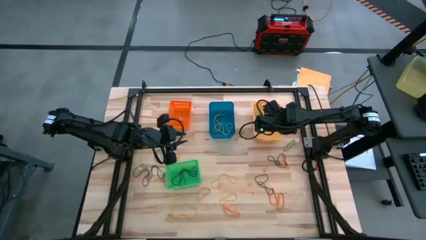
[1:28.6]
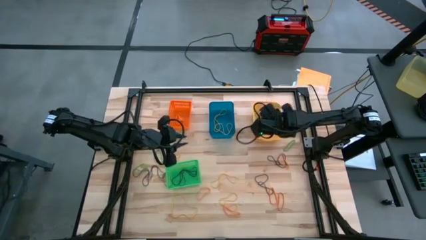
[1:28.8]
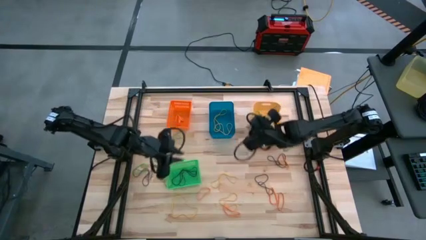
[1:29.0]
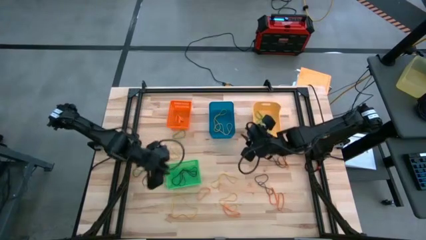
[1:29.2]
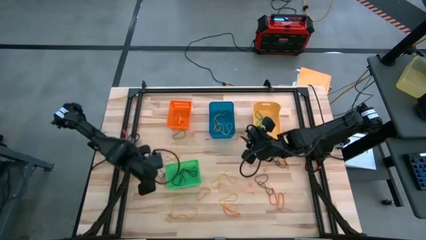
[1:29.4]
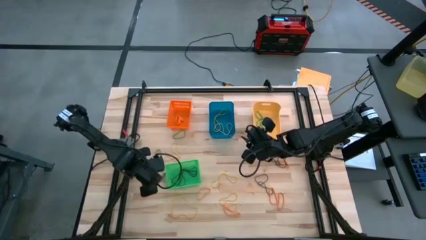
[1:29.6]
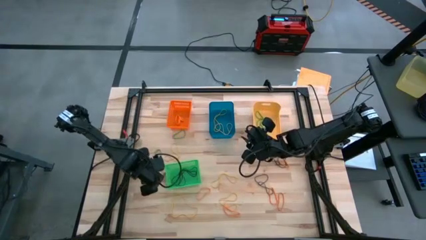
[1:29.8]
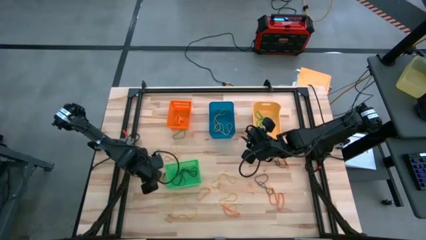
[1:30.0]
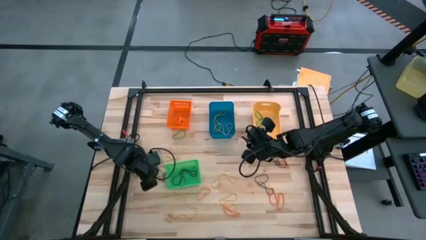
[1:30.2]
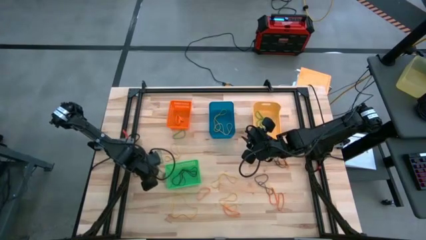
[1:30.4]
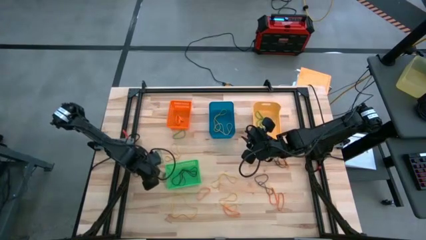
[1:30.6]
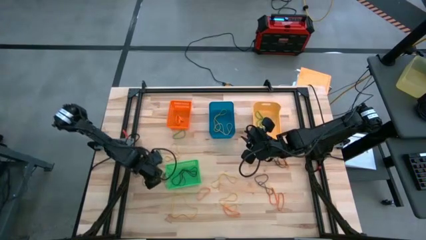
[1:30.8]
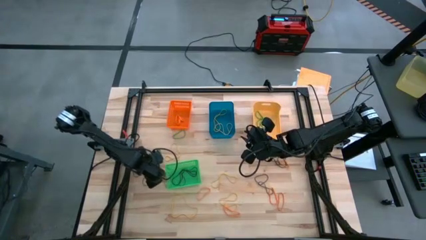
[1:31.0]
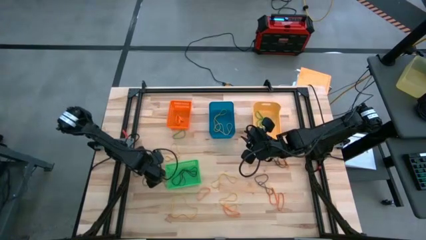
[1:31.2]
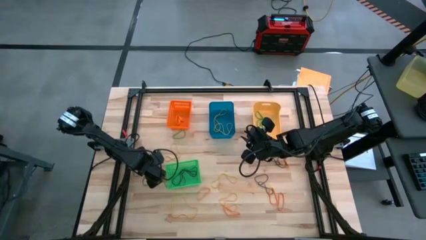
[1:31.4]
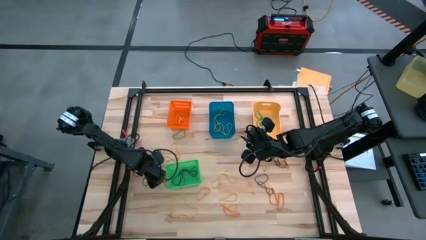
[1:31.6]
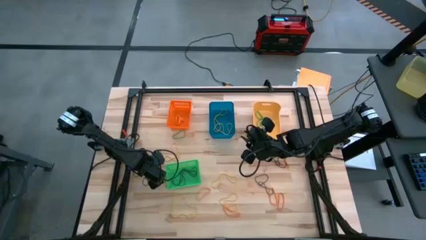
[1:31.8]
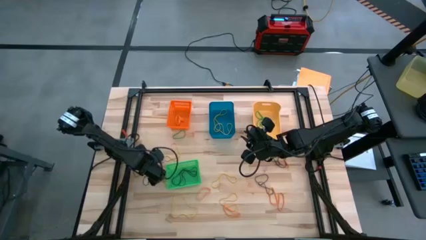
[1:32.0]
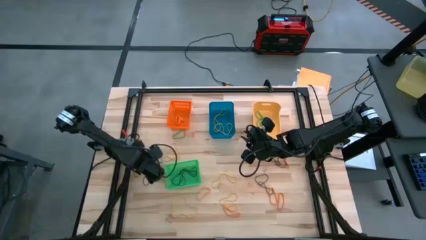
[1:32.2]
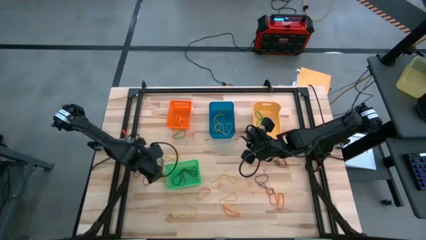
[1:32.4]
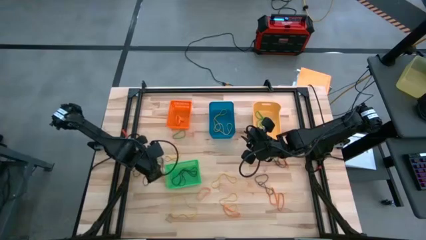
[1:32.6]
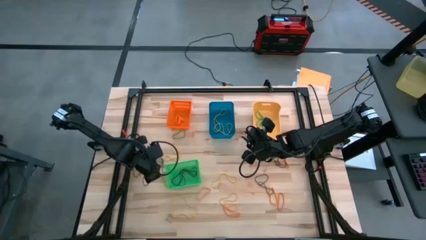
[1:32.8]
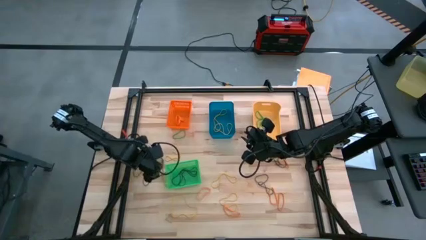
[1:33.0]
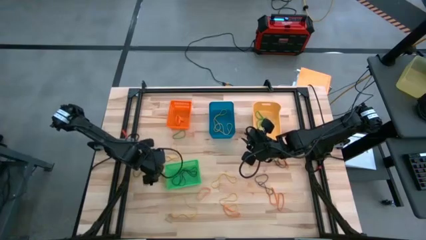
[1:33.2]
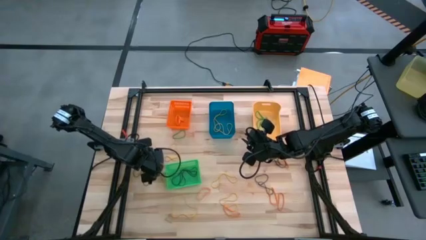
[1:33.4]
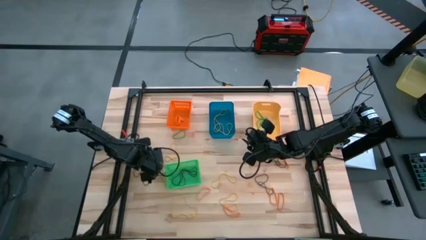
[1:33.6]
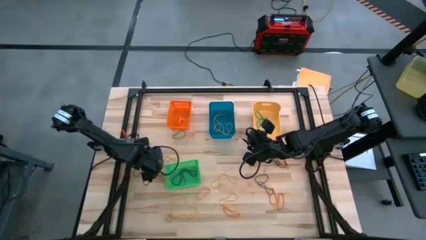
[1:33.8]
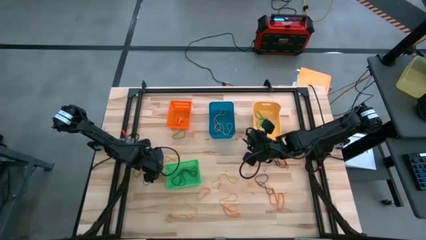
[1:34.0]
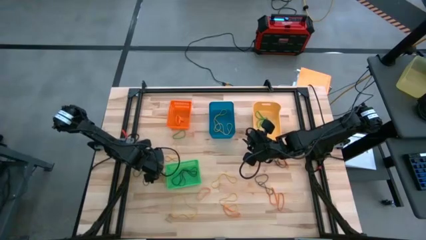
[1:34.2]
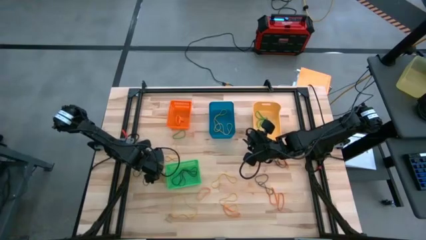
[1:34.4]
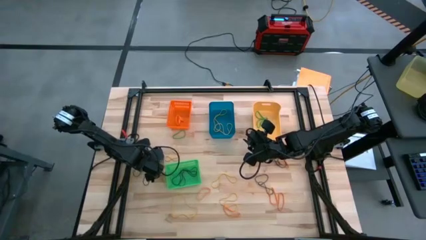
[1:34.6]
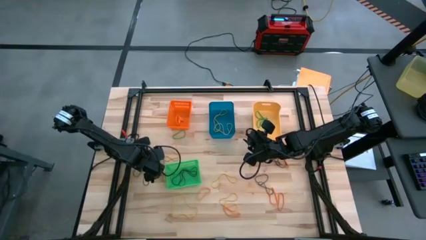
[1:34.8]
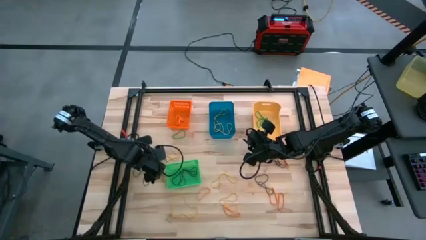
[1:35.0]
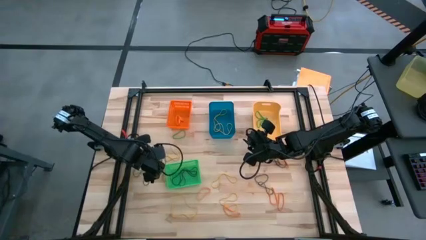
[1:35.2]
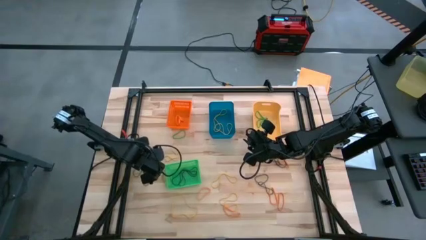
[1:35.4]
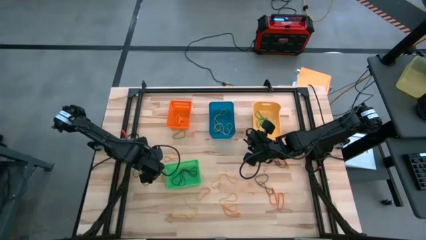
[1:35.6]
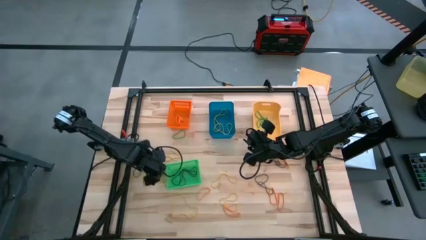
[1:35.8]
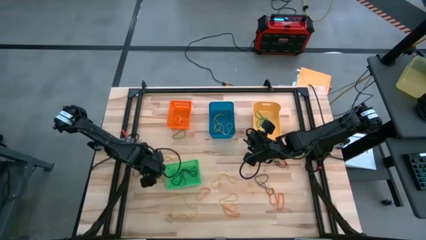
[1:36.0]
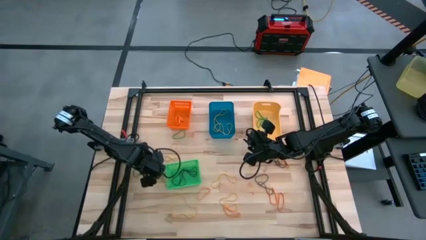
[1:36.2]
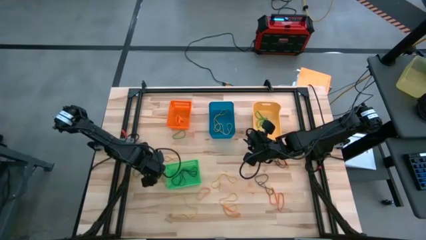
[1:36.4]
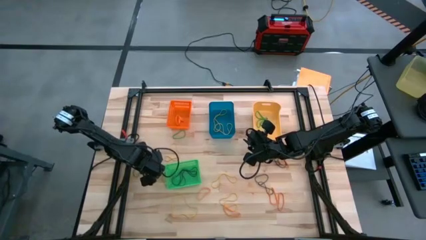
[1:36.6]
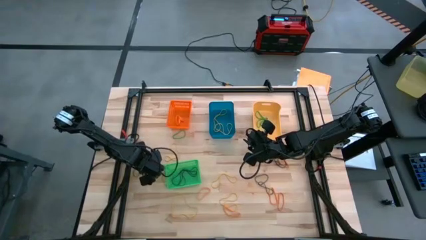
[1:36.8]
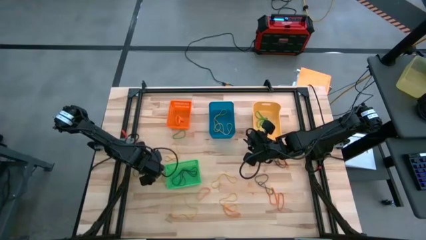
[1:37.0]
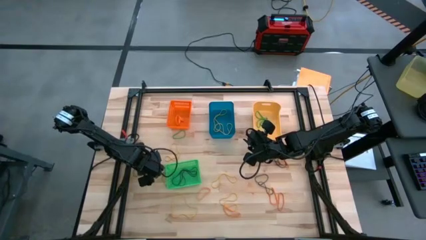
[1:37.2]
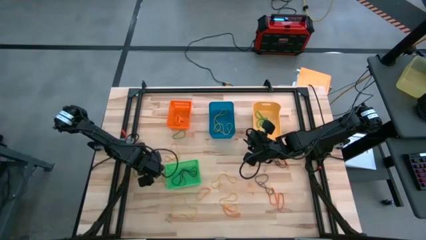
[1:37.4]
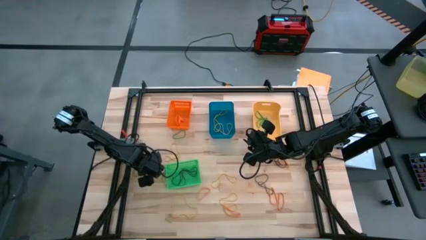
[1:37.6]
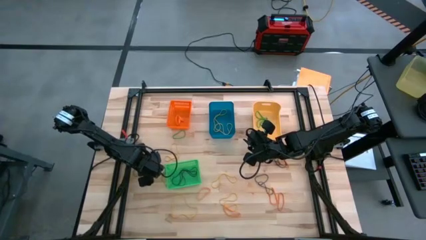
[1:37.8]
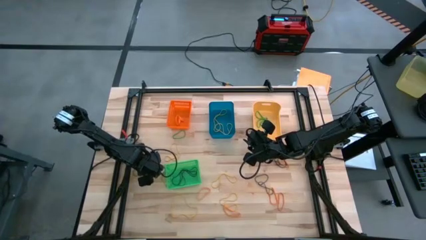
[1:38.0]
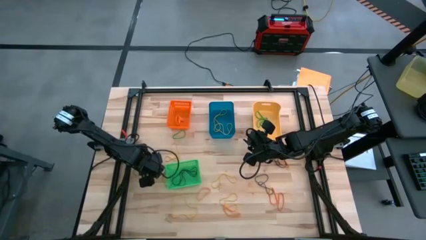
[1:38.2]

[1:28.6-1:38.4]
Task: Sort rubber bands into baskets
Put the violet rubberband into the green bin

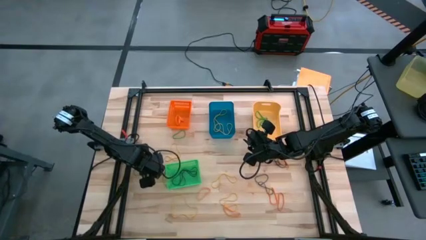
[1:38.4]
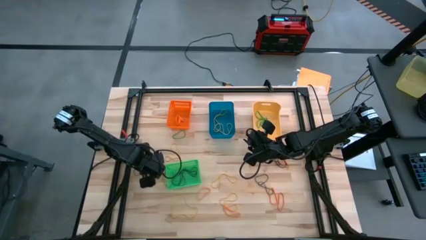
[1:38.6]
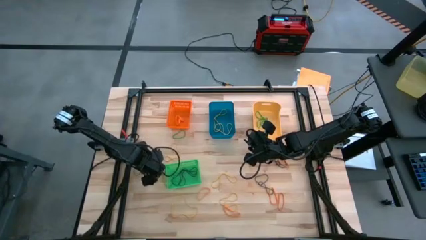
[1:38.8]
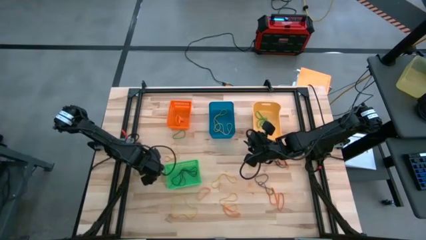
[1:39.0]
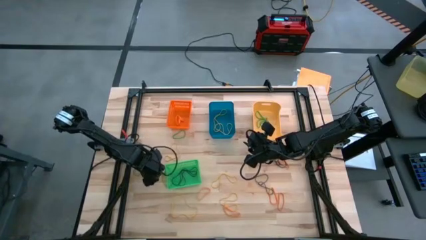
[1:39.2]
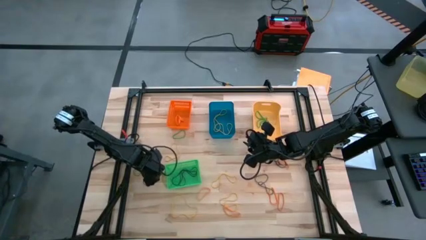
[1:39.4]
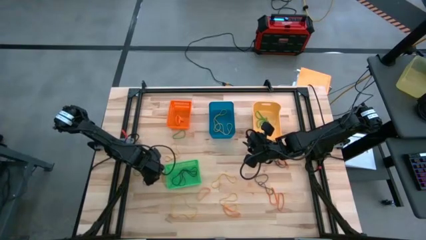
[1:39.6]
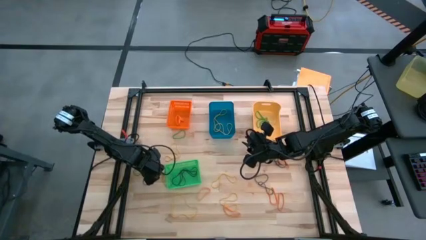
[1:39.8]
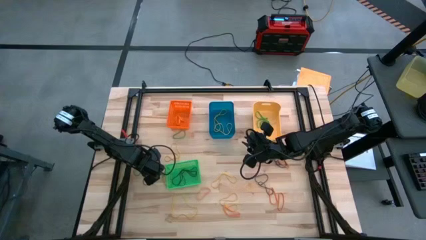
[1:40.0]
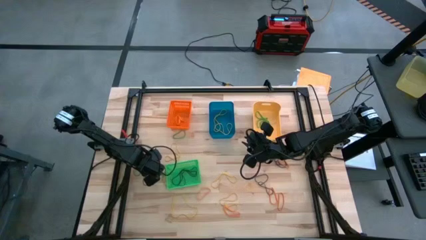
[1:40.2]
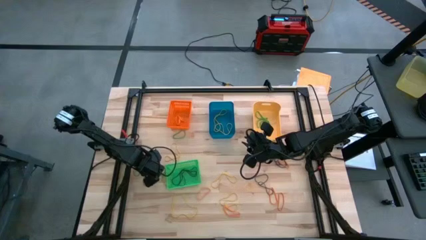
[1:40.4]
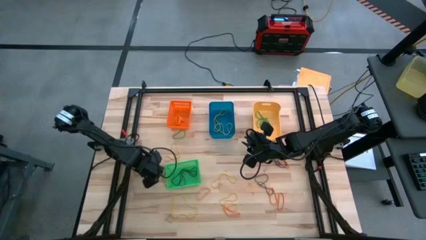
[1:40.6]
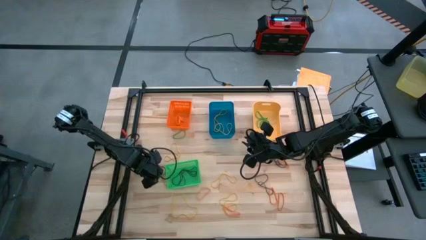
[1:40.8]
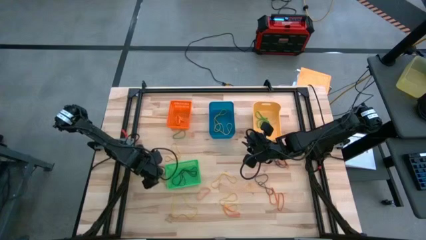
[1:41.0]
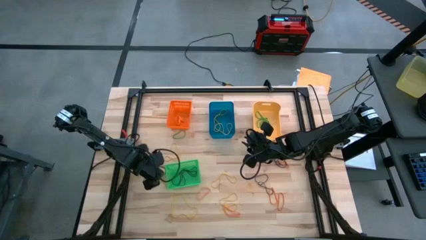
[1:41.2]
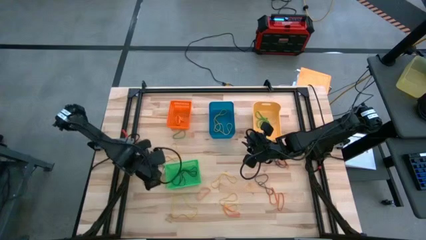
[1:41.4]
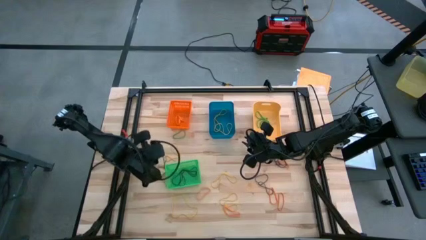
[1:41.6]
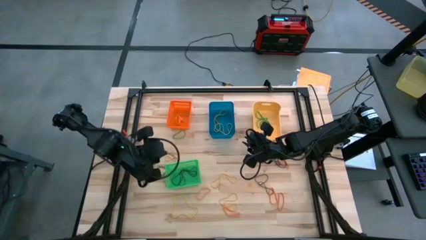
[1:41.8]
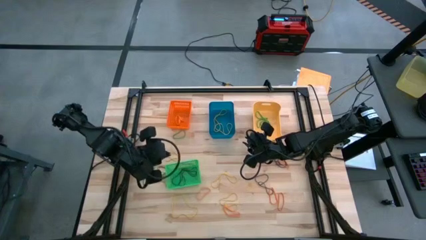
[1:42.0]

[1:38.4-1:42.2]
Put the violet rubberband into the green bin

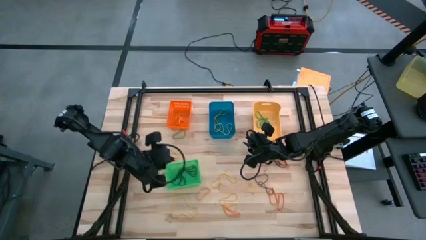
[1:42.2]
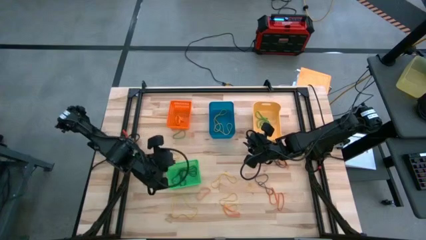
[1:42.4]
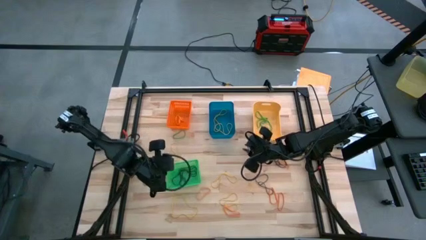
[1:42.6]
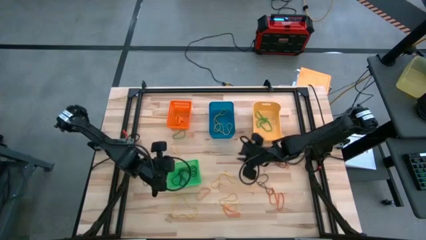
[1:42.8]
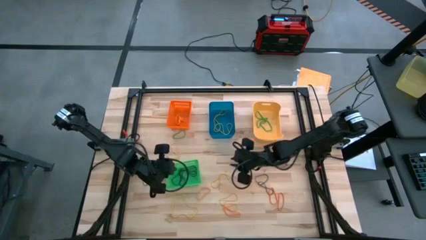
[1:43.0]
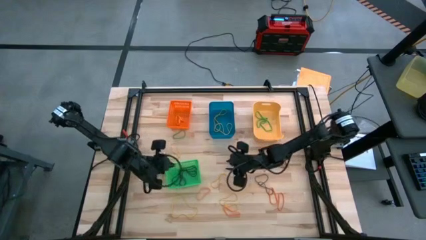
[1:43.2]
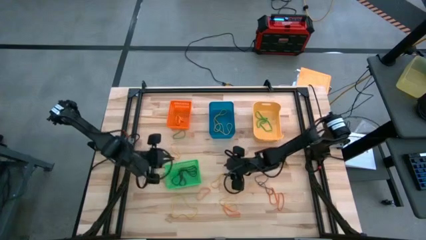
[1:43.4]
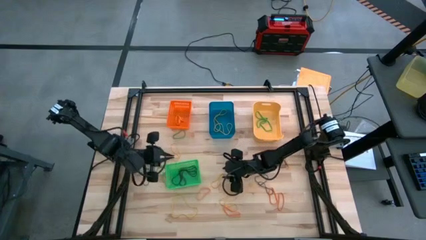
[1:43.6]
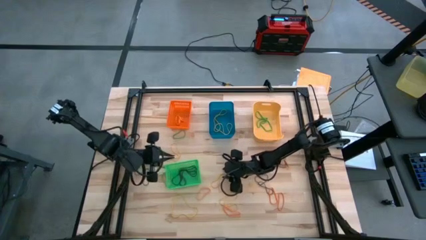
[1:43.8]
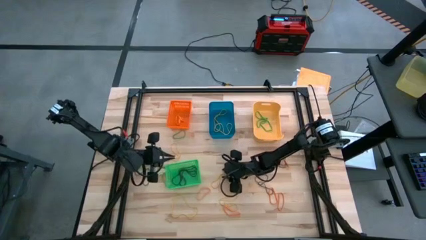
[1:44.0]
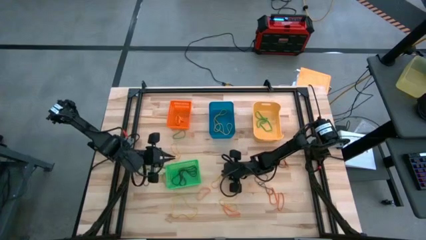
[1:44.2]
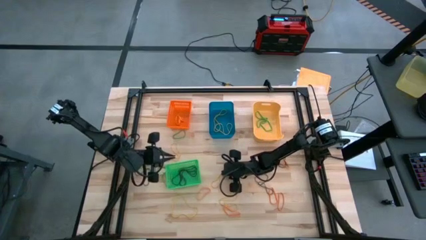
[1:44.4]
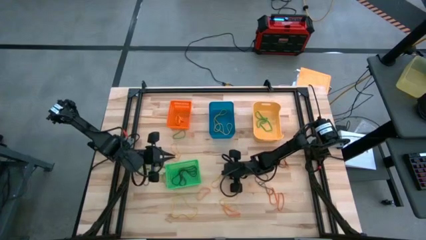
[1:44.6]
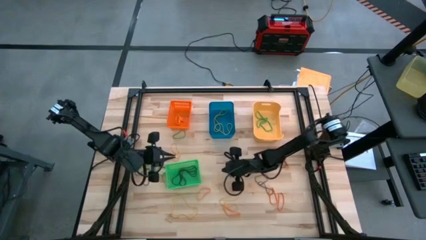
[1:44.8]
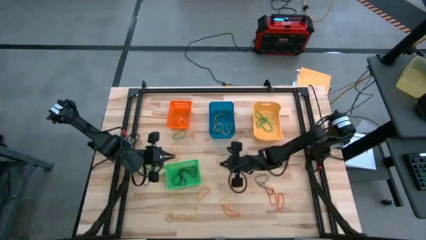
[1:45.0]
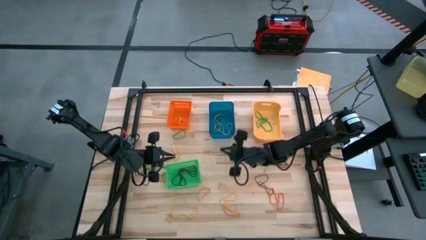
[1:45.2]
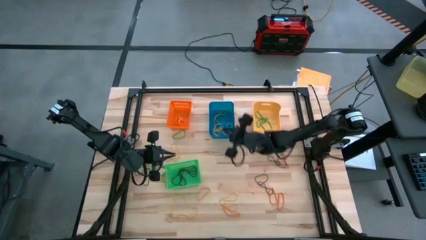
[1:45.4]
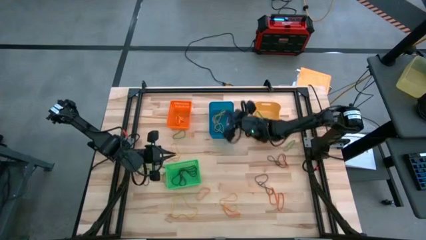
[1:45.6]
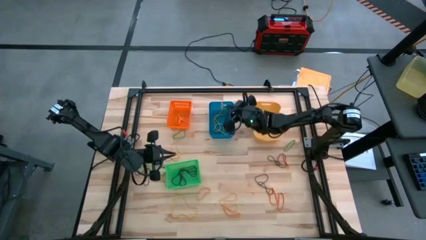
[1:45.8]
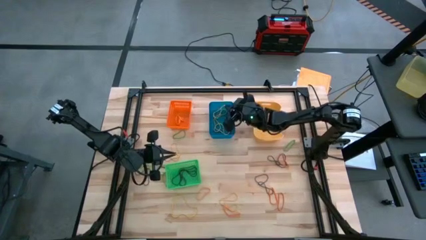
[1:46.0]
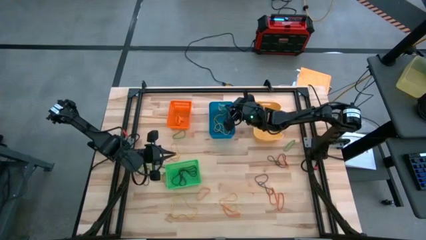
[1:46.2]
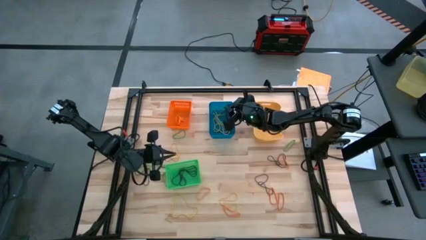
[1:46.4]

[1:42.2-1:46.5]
Put the yellow rubberband into the blue bin
